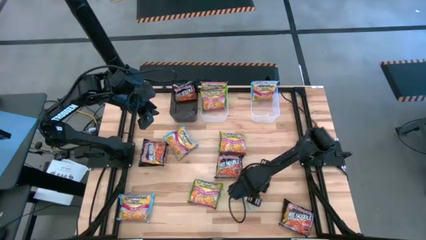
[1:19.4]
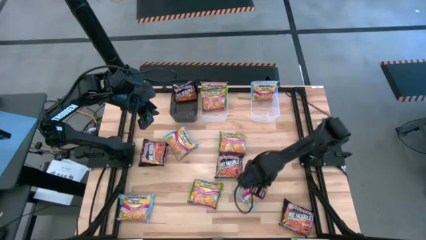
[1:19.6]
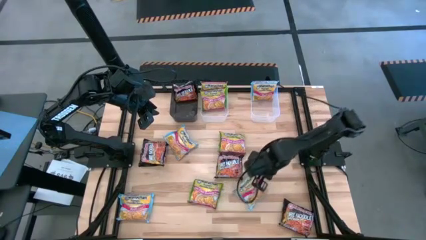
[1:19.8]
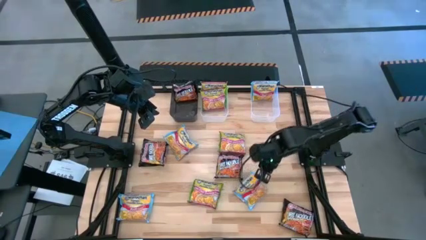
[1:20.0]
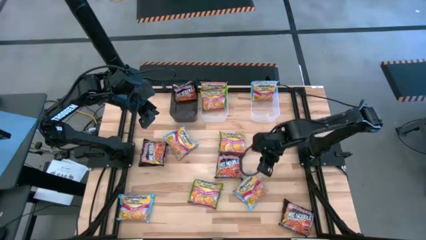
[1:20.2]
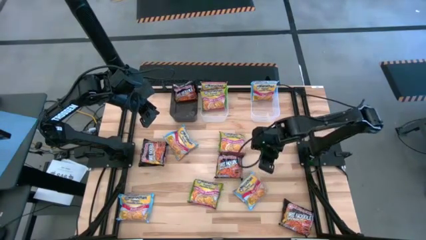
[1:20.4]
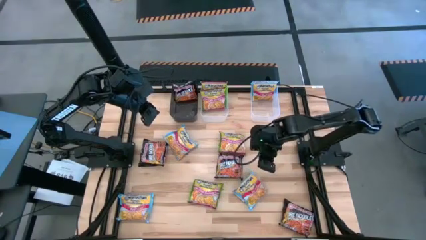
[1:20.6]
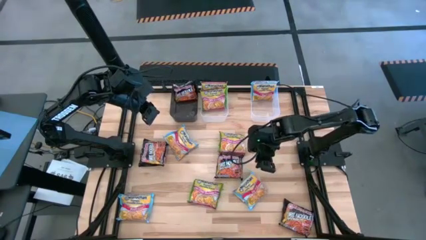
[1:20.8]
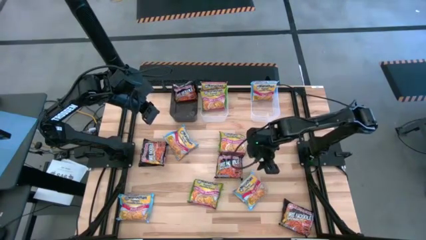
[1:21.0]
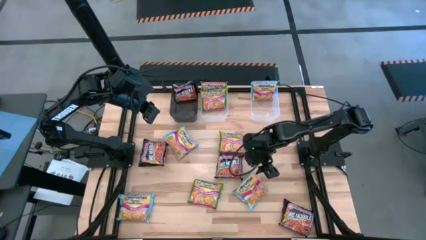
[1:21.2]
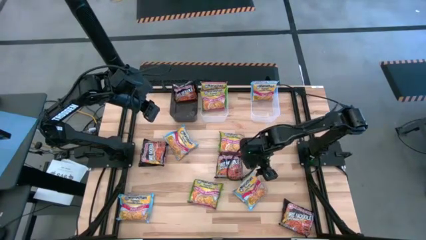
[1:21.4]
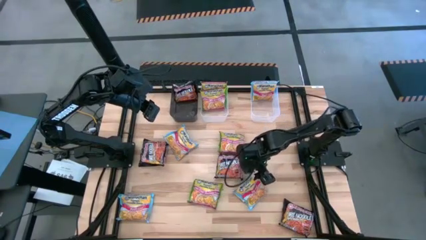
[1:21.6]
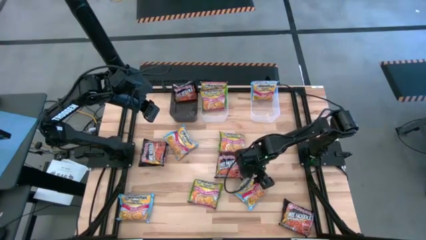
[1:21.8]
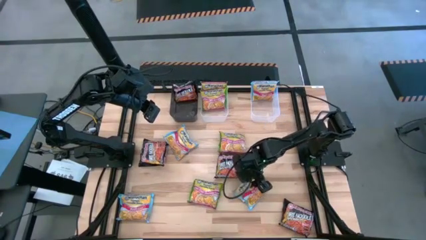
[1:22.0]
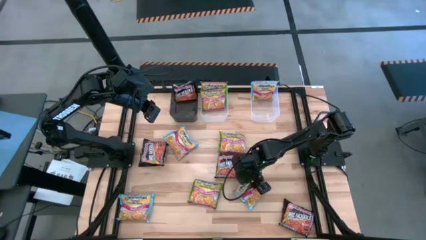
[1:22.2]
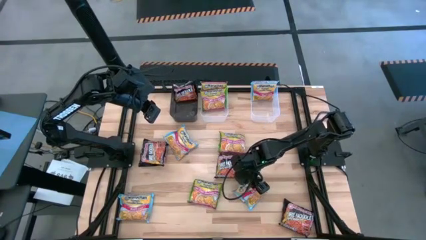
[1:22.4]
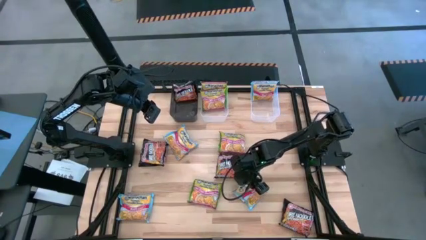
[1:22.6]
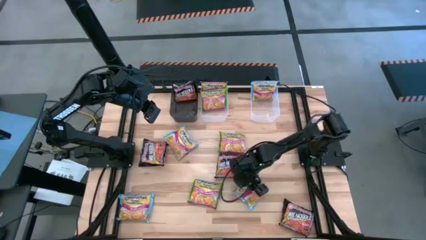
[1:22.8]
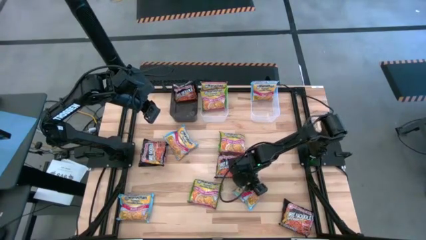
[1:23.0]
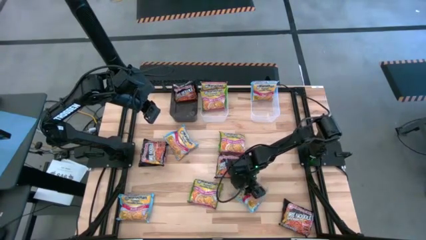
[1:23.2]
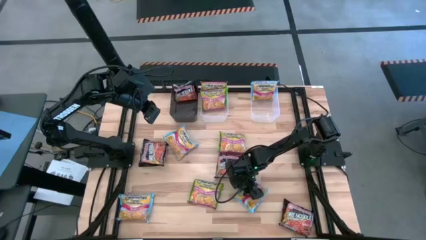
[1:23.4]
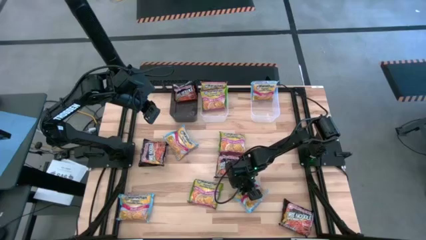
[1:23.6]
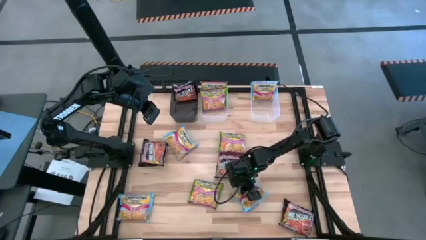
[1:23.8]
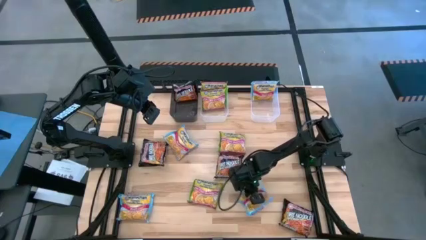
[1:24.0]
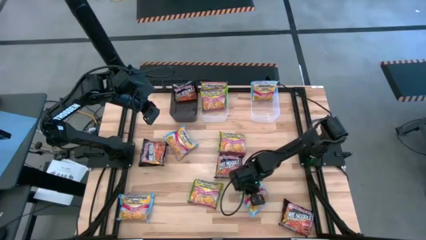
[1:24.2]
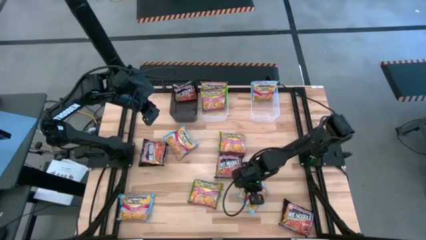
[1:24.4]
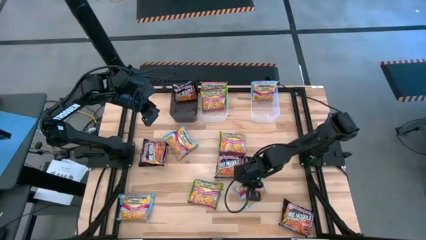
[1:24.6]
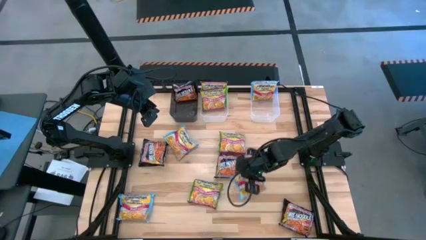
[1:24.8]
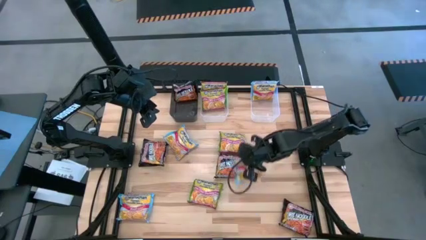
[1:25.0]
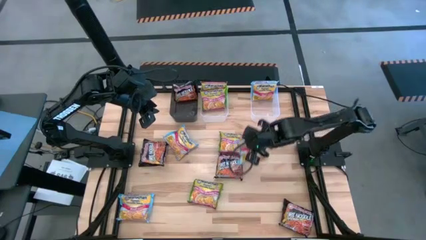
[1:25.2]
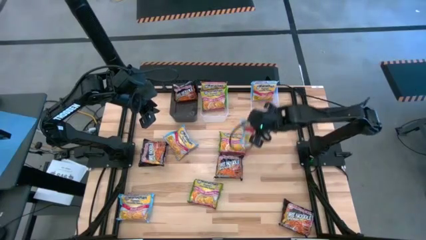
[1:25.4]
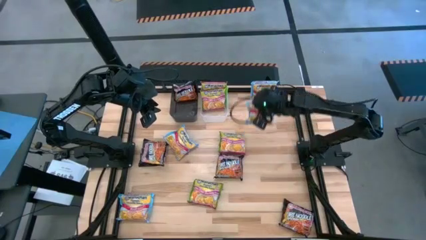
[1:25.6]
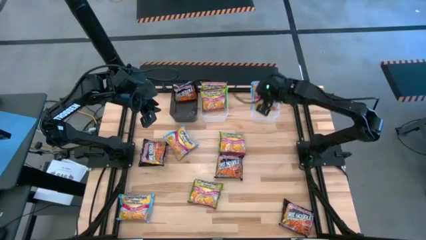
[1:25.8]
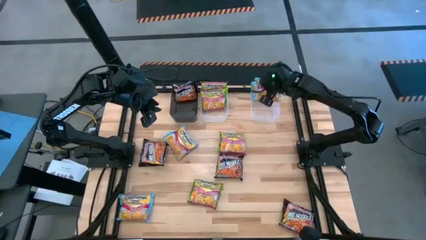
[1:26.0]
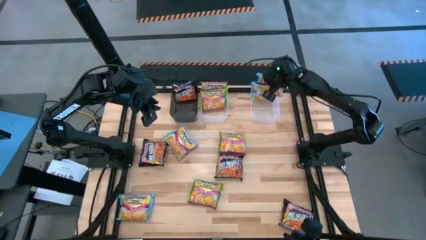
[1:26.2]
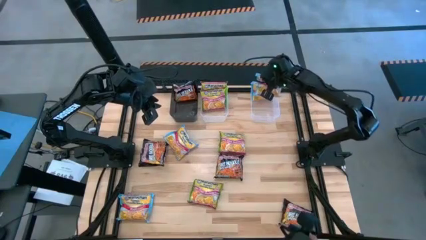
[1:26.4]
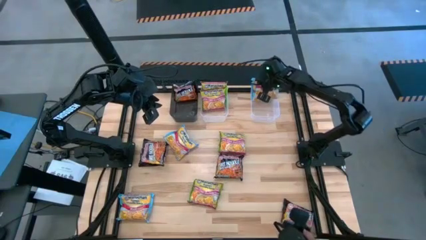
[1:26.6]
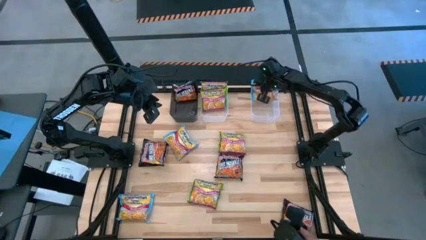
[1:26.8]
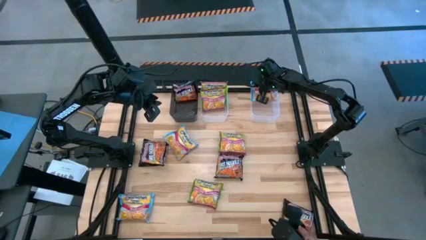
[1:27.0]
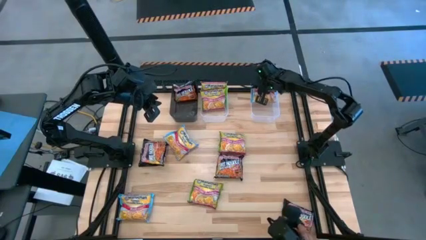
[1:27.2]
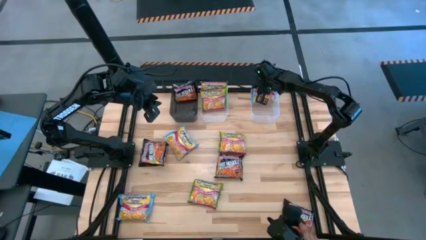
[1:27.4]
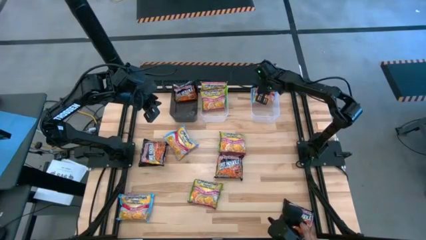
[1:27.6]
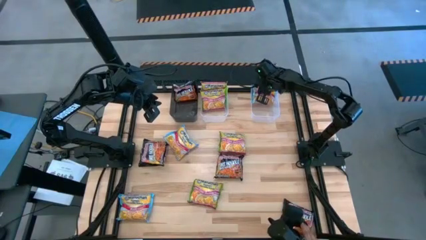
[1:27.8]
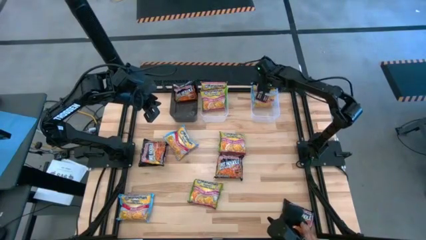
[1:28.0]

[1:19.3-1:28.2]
Task: Sort Maruchan noodles
Put the blue noodle pack into the right transparent bin

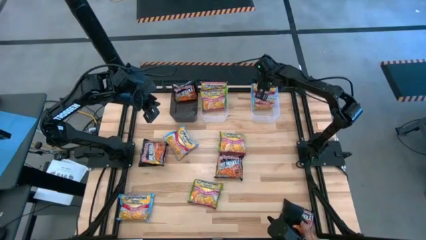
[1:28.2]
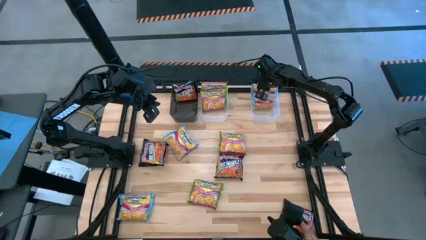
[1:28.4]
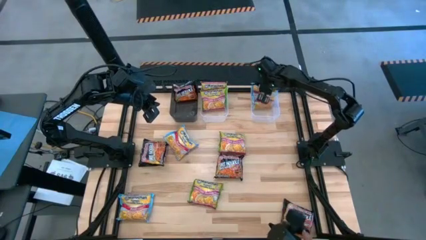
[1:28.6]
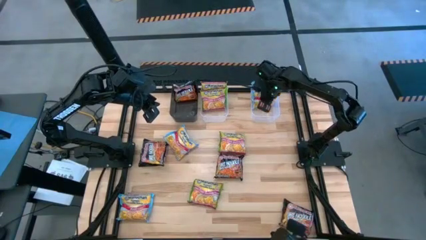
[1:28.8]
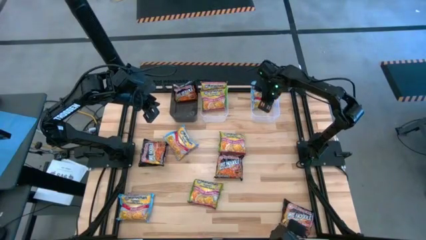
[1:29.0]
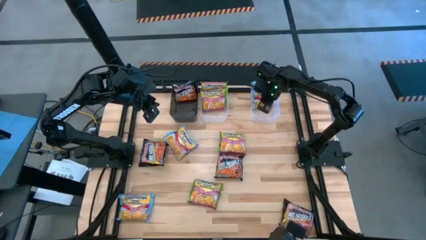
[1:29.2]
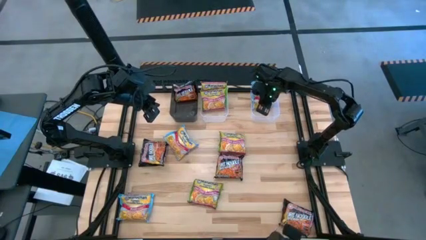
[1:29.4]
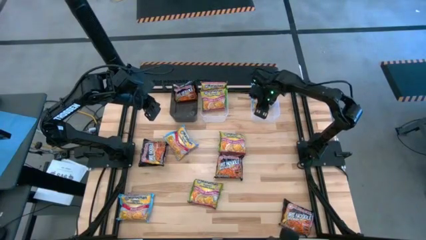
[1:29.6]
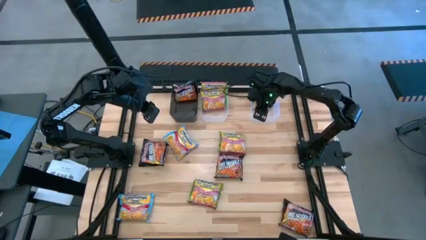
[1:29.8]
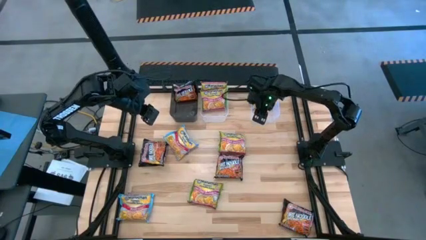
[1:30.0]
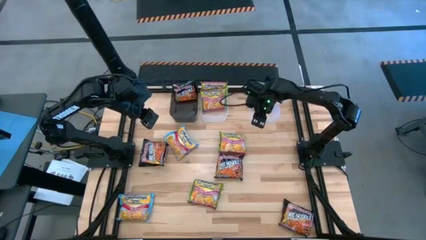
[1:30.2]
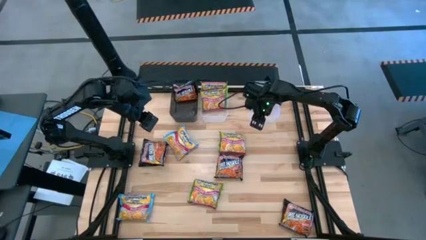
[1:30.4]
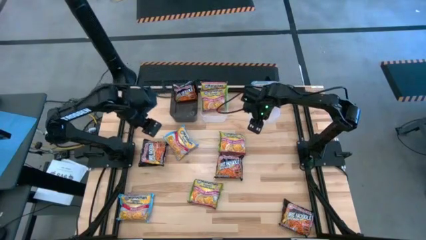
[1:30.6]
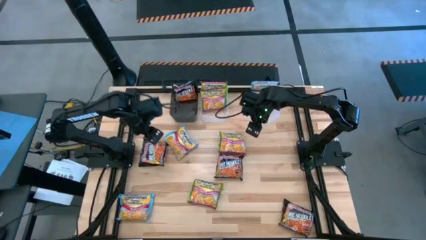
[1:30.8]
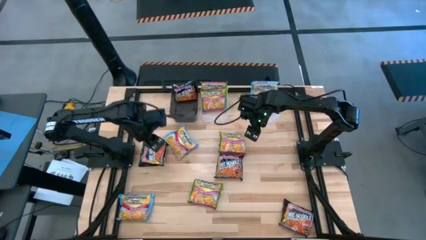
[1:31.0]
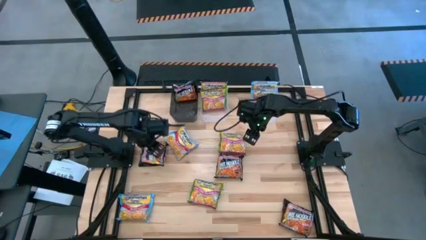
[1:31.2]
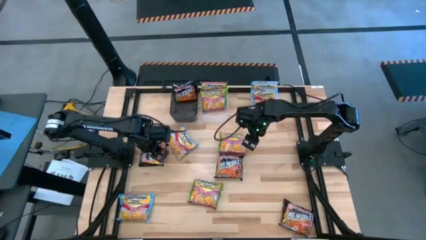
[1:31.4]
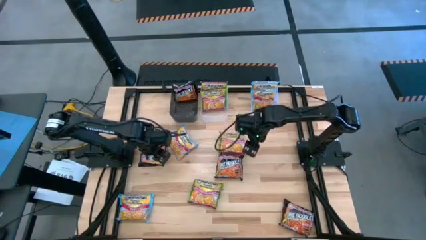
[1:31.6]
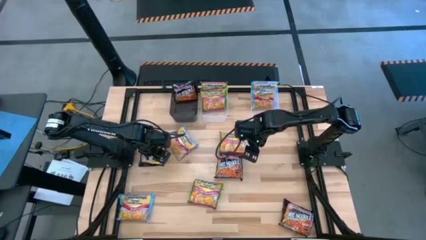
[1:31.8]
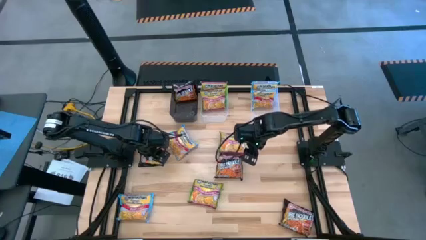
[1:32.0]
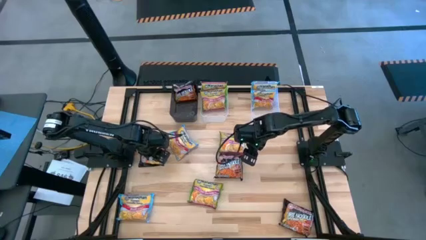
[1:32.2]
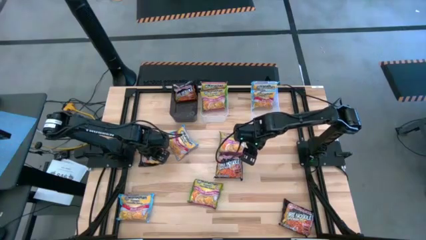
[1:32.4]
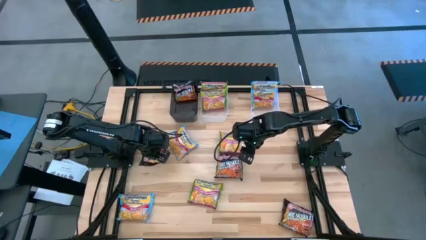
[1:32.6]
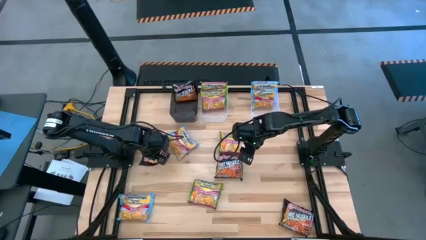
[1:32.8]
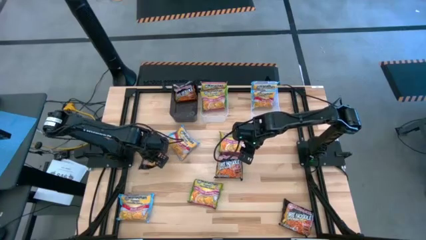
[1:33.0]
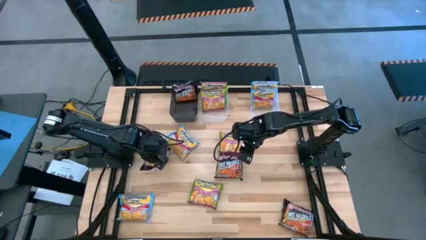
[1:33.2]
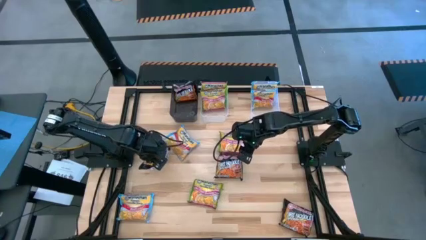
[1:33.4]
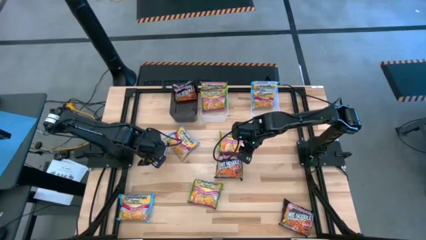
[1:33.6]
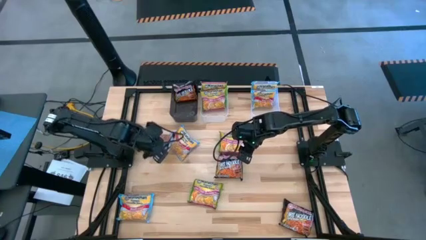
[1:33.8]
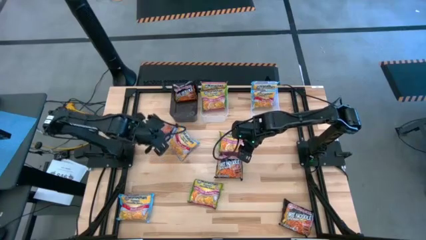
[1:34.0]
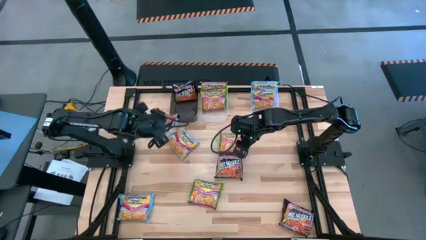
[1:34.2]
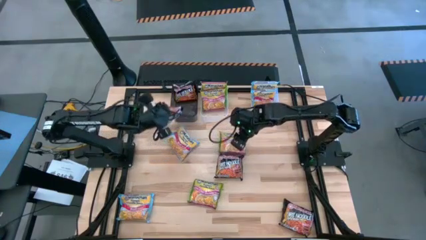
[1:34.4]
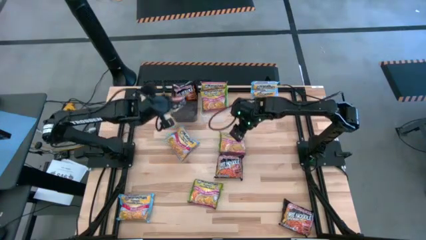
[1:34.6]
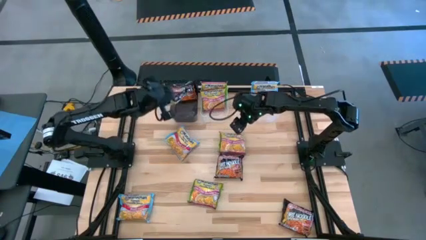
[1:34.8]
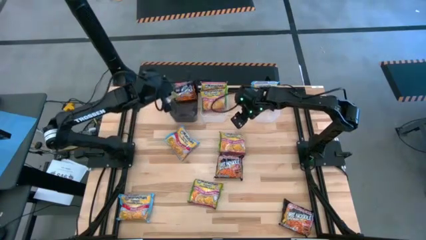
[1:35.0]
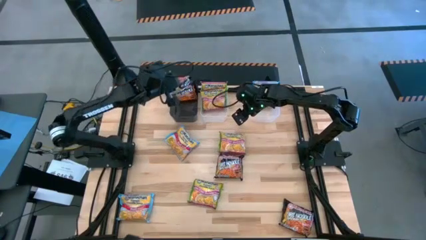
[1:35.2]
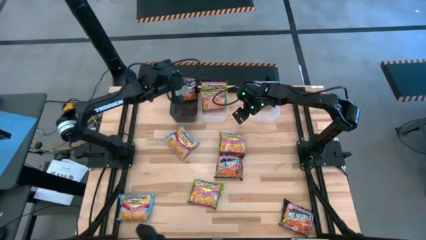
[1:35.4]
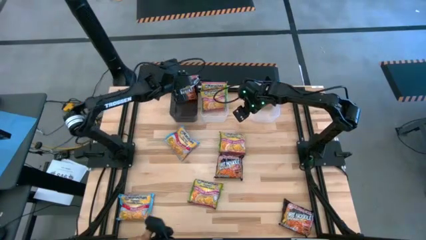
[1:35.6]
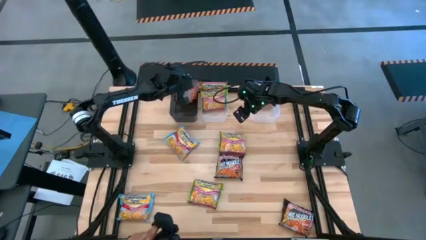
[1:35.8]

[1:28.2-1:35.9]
Put the black noodle pack into the black bin
